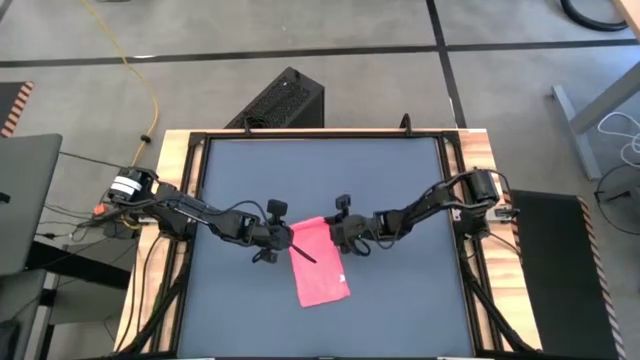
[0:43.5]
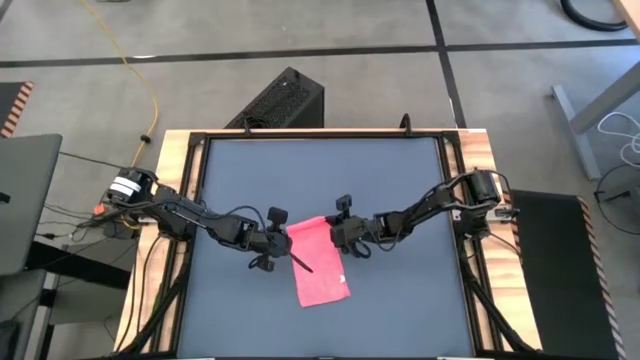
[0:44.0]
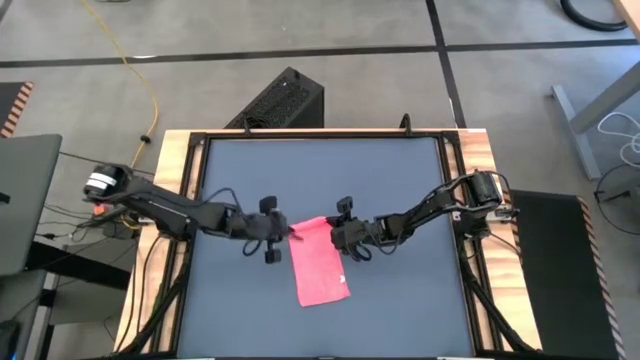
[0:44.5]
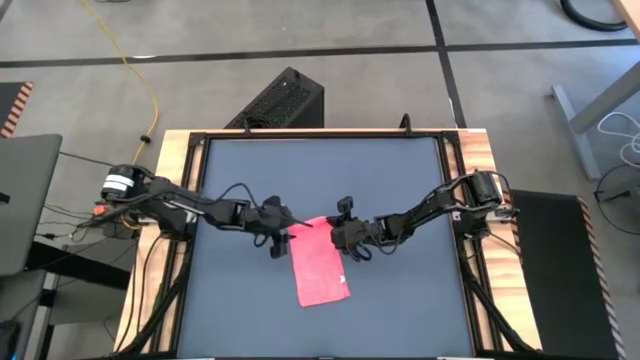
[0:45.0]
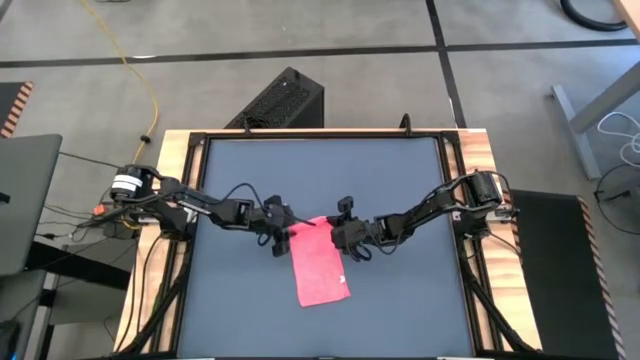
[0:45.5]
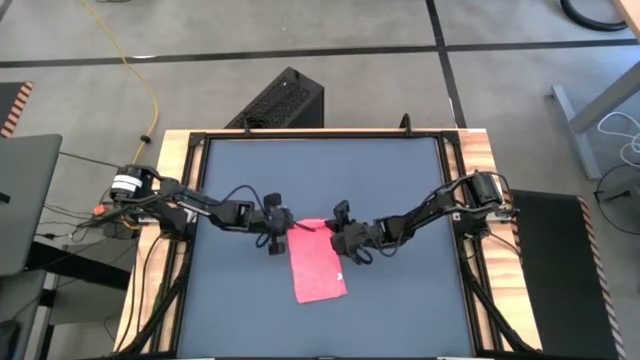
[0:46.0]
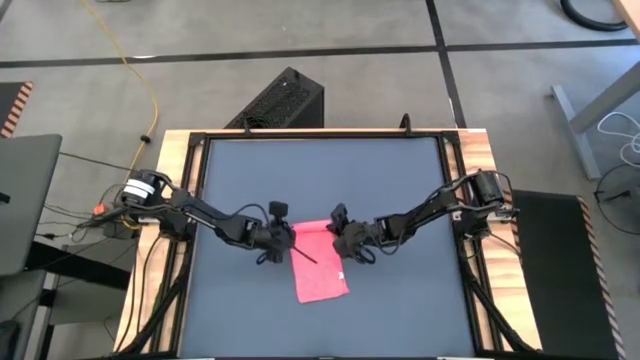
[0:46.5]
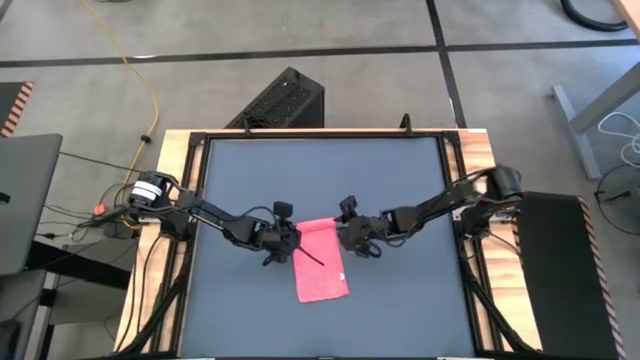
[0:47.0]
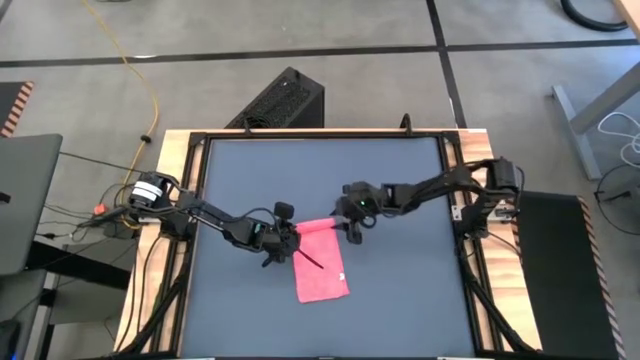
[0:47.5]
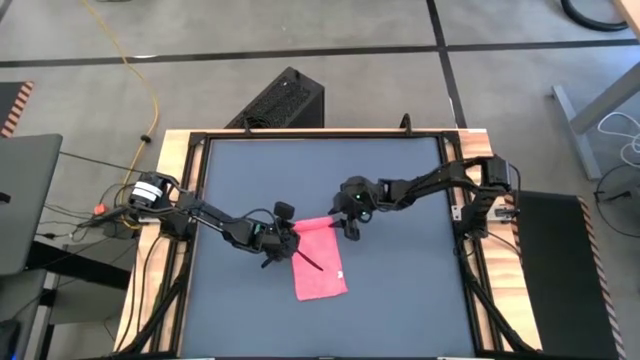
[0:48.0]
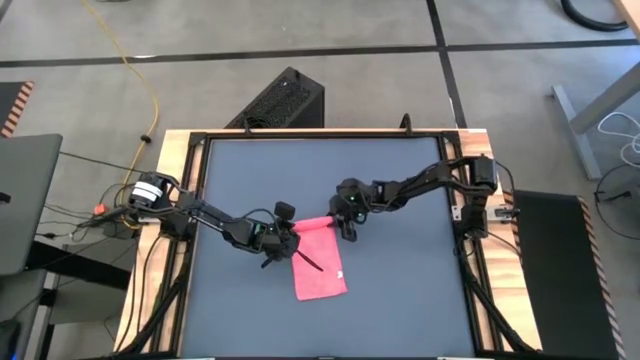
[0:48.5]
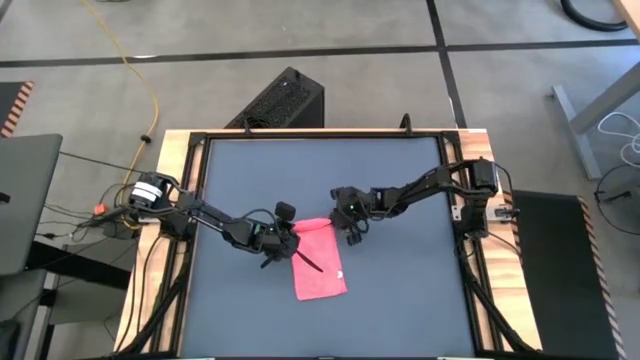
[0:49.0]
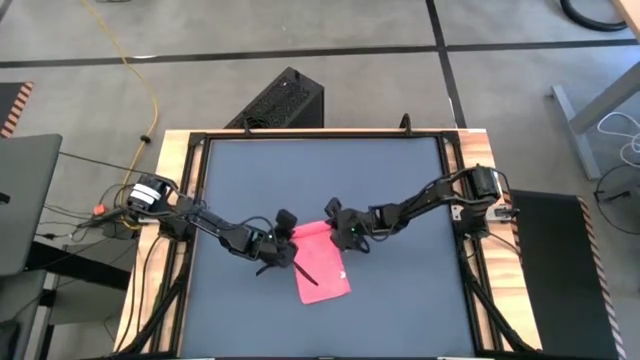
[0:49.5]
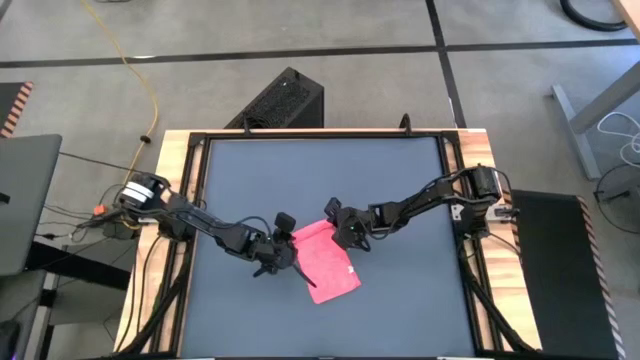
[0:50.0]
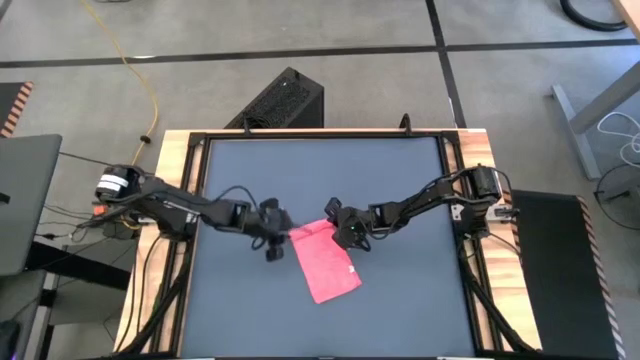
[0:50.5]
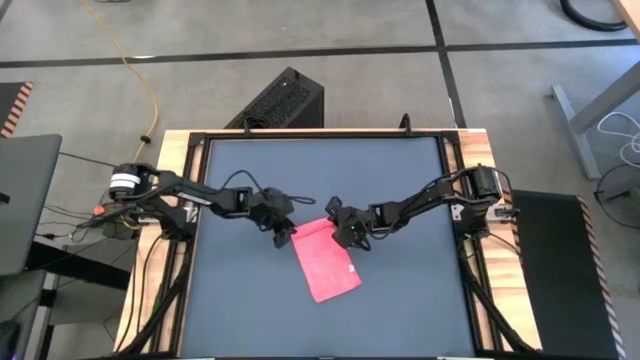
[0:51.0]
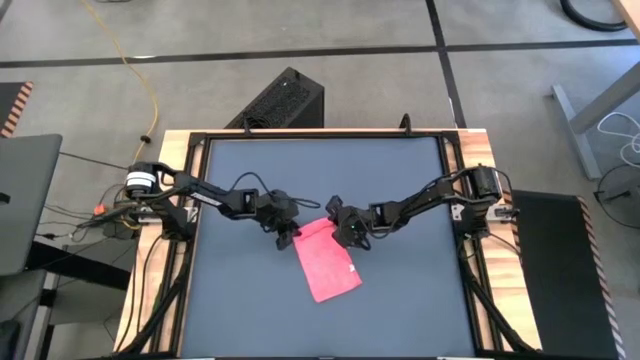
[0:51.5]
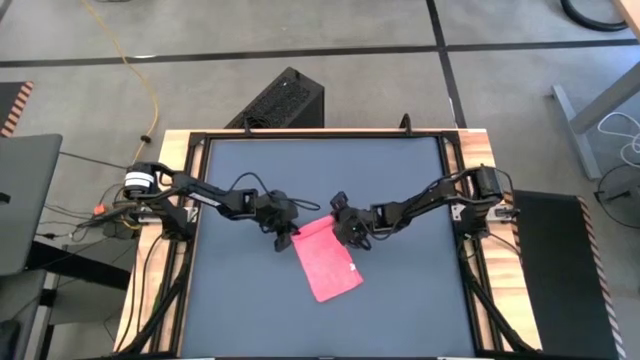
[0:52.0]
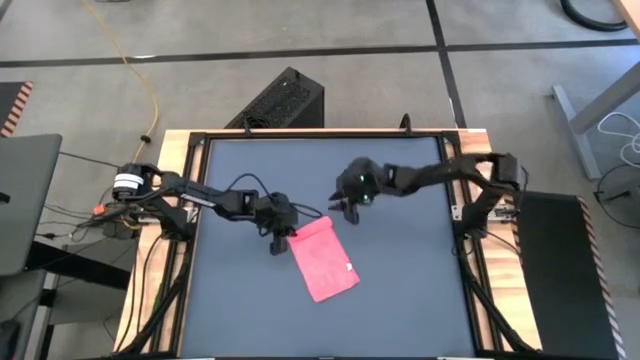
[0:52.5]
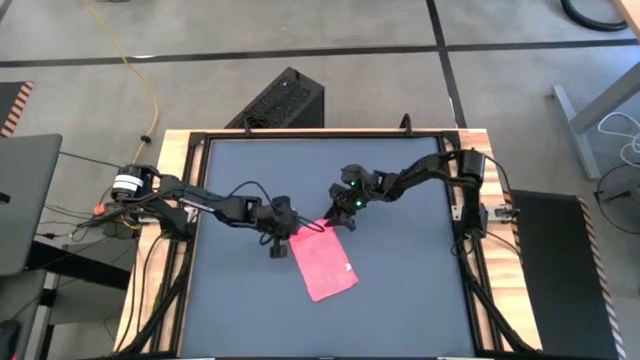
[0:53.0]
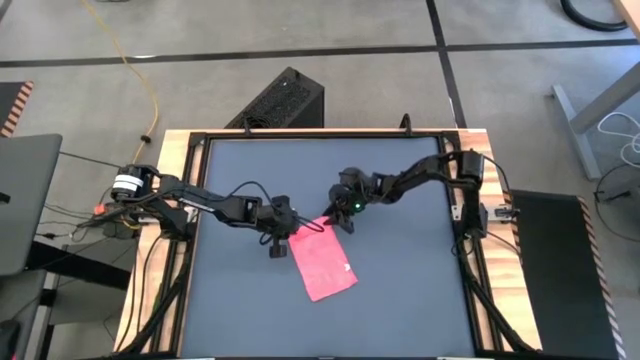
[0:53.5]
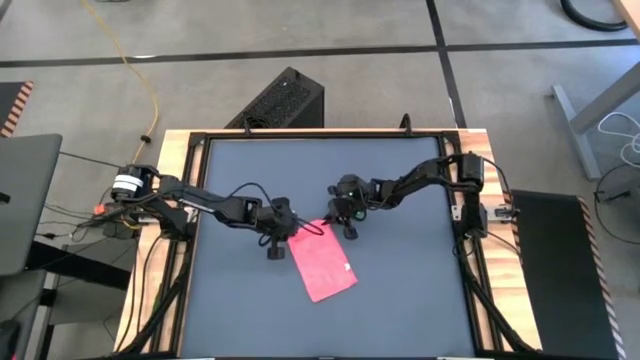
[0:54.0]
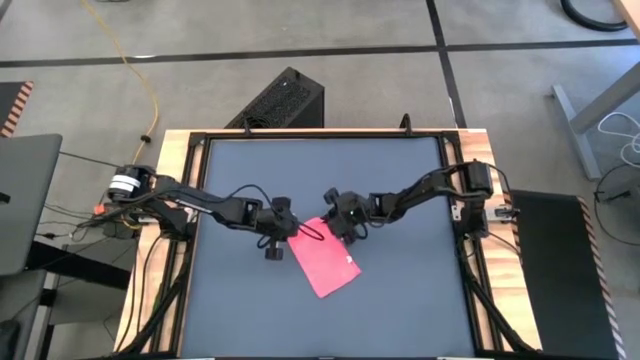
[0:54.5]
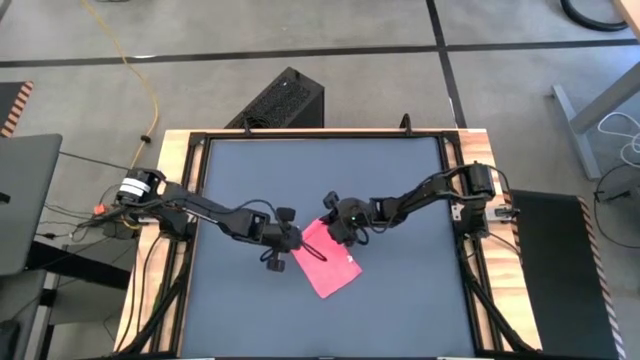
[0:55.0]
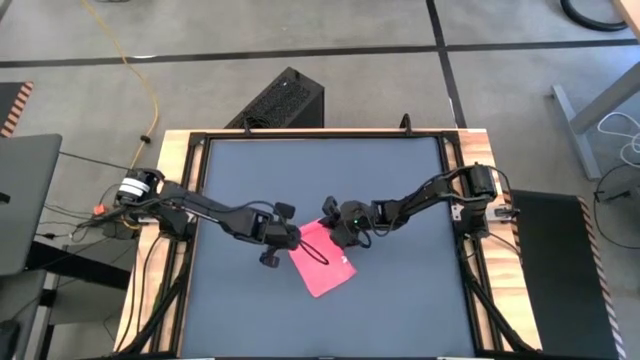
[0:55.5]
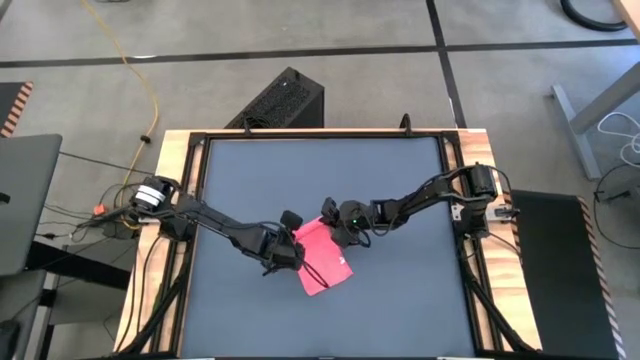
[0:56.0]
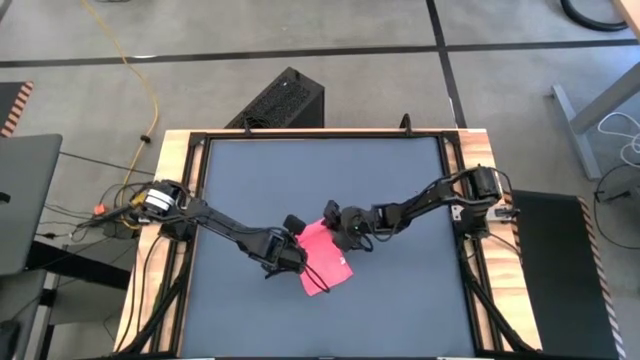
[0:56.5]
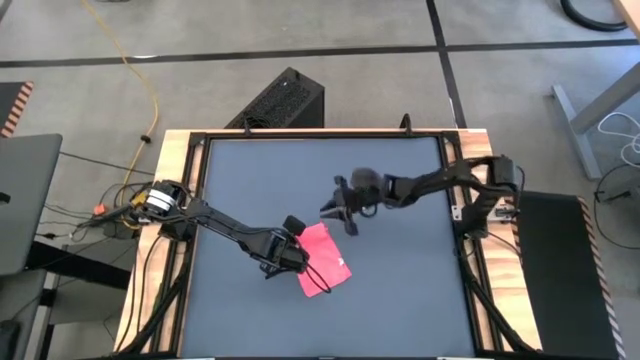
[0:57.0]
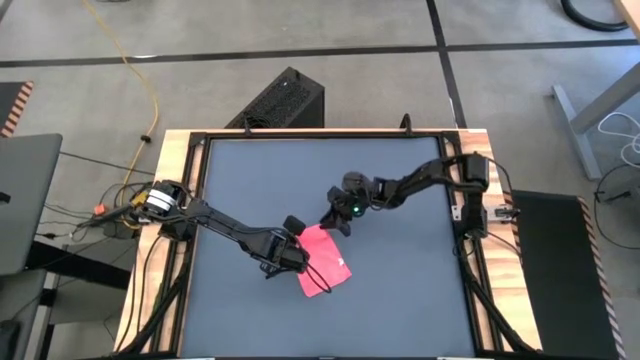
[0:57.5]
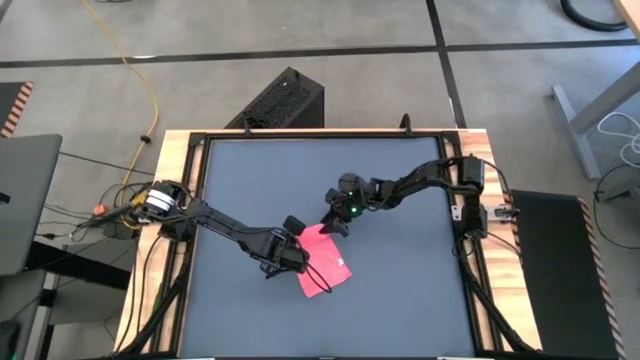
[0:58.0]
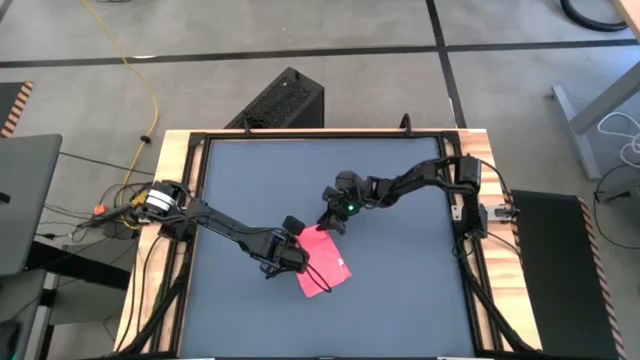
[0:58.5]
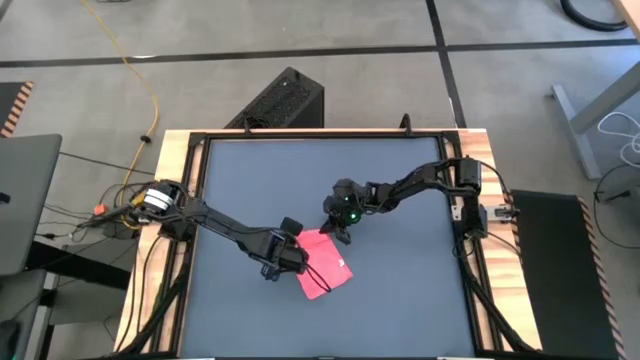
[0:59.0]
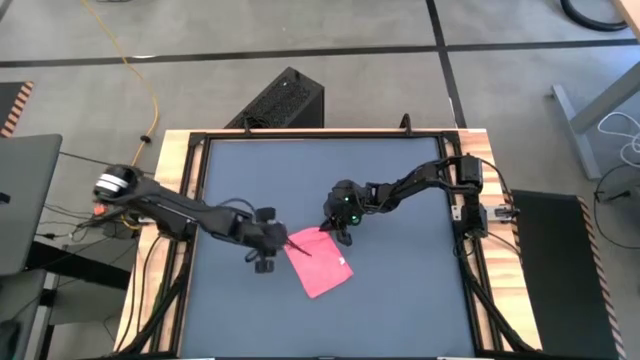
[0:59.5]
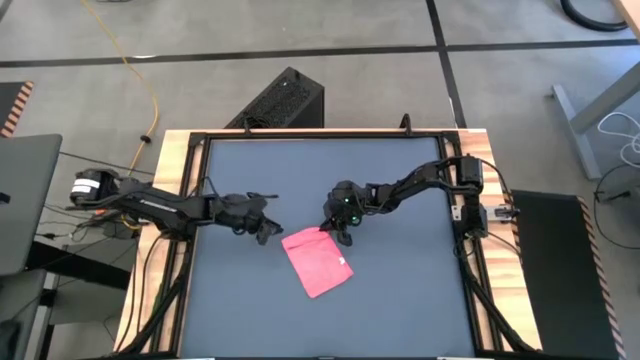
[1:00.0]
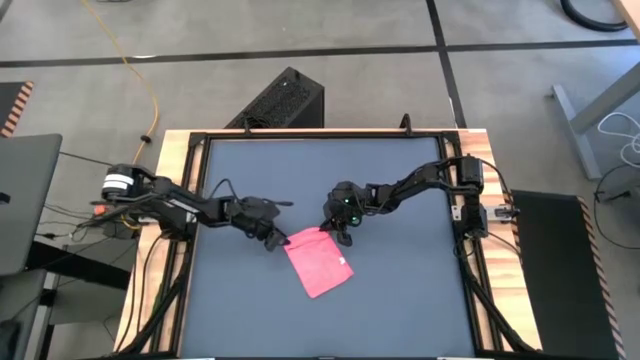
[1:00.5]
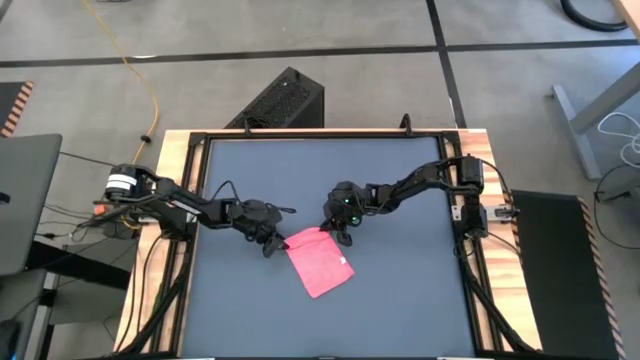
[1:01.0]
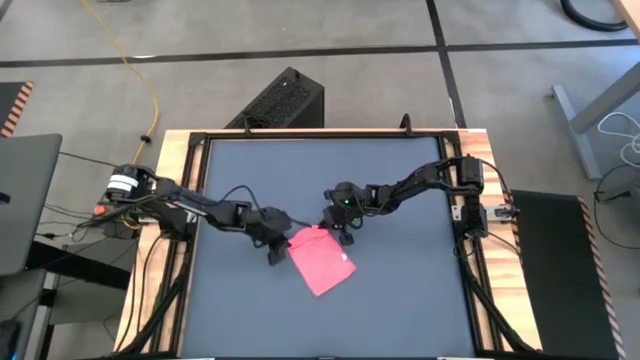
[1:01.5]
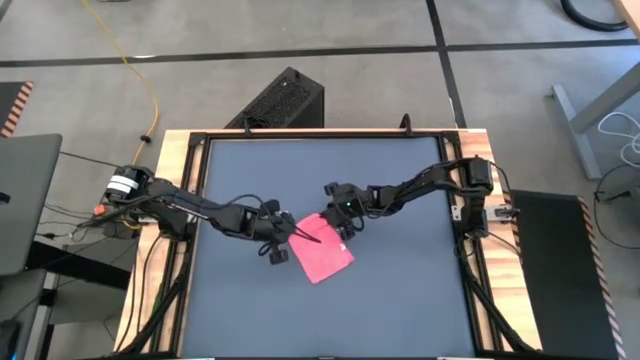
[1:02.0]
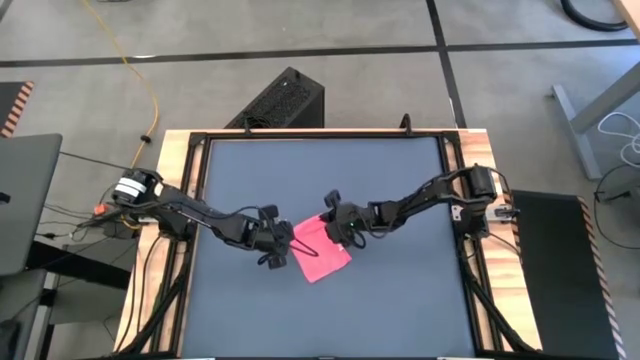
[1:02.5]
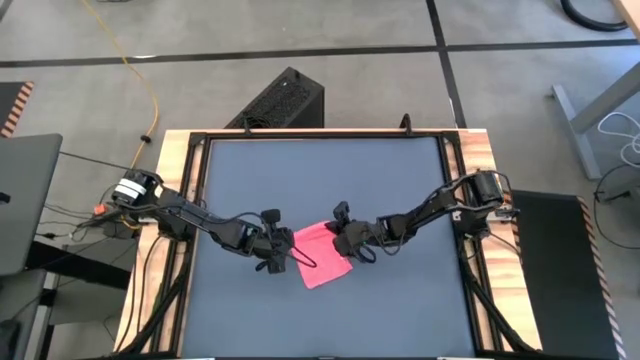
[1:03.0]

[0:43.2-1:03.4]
Task: Roll towel
Roll the light red towel
